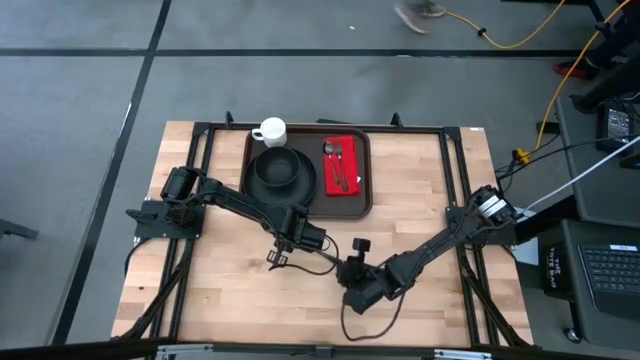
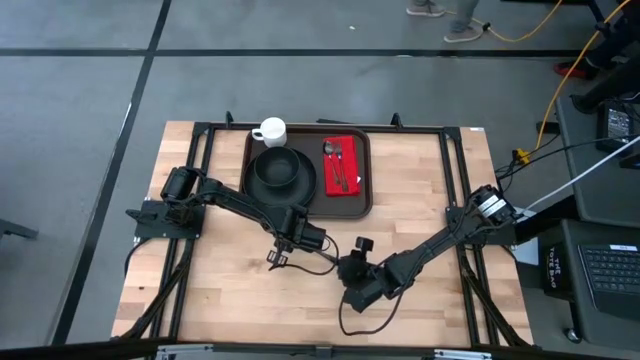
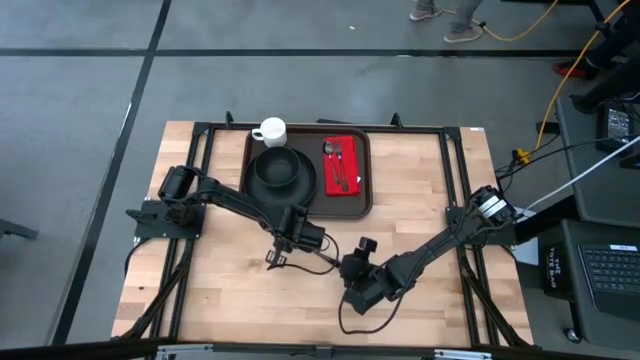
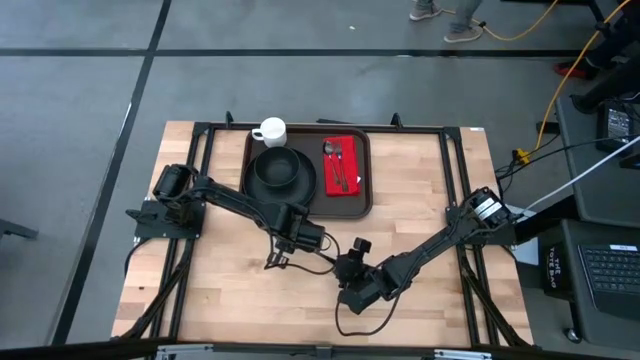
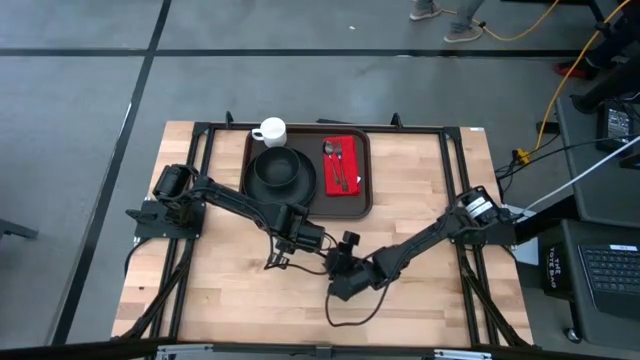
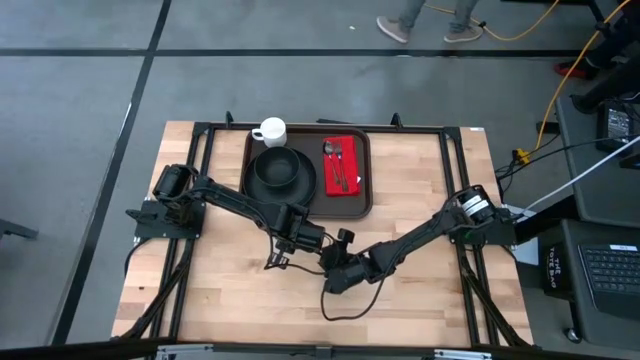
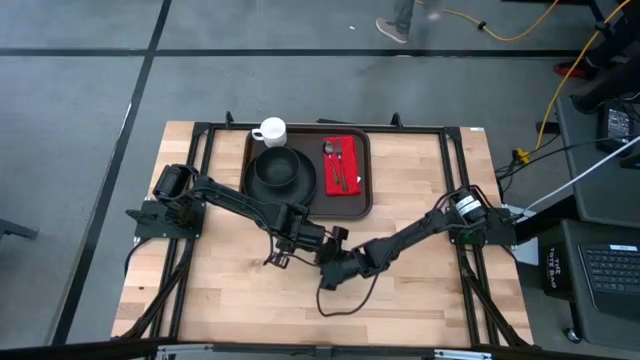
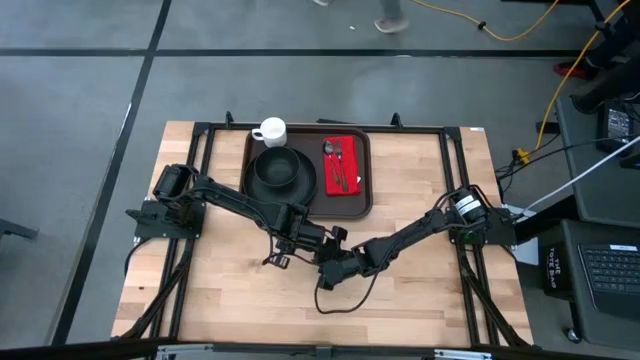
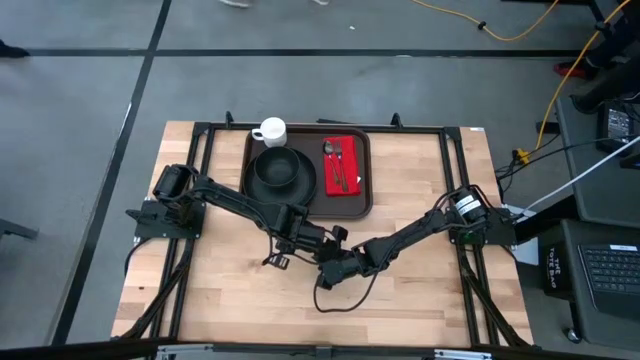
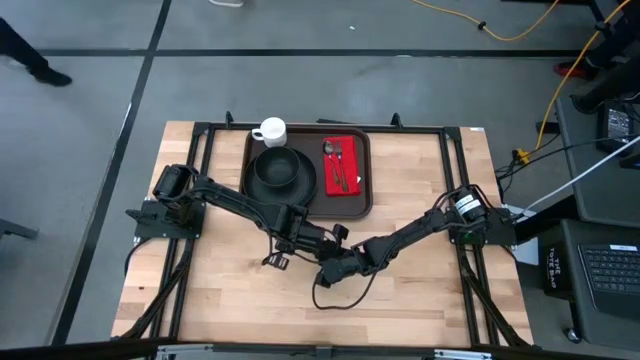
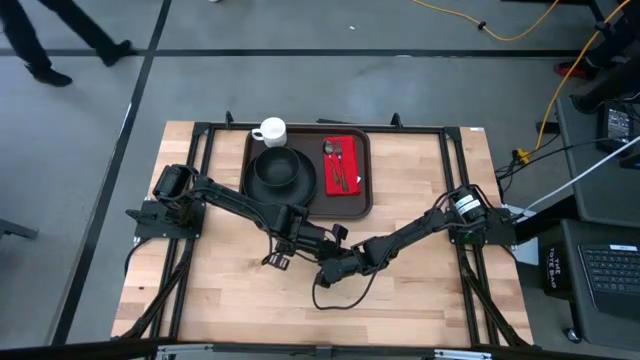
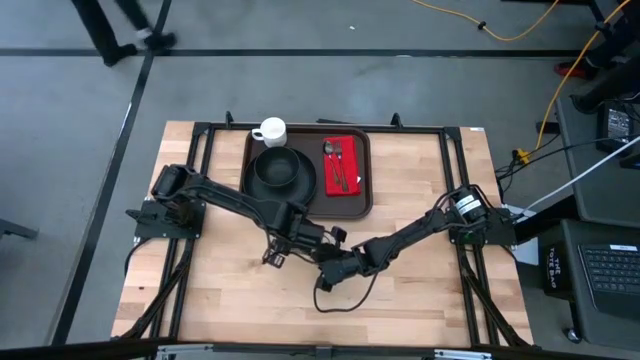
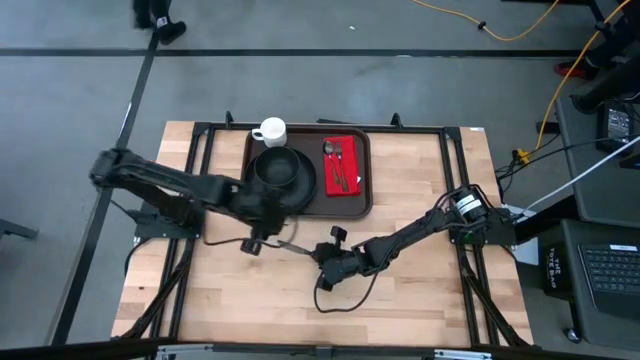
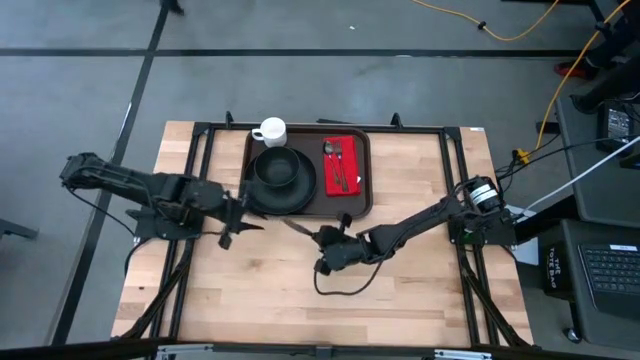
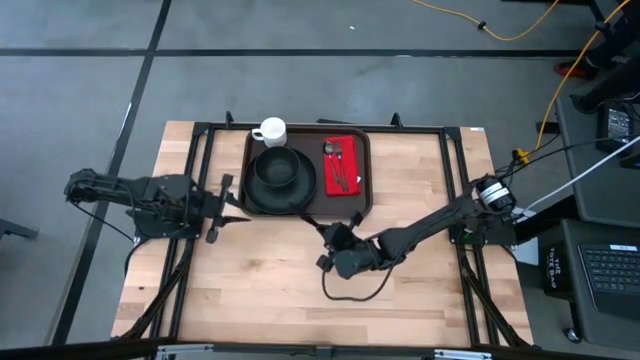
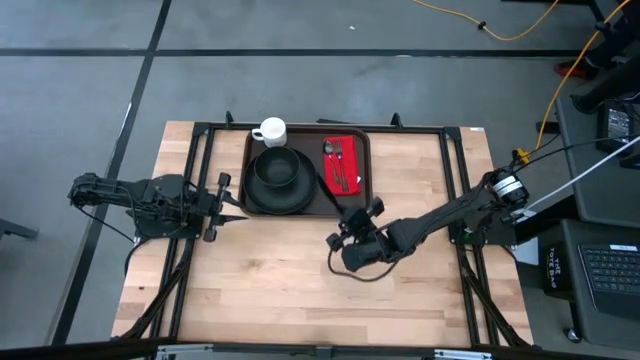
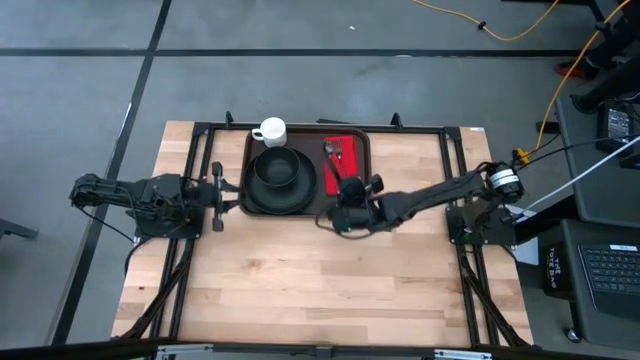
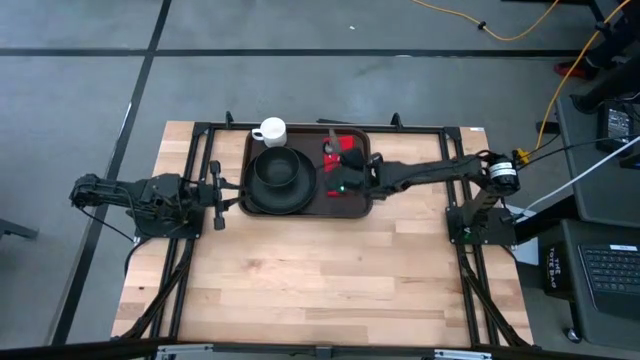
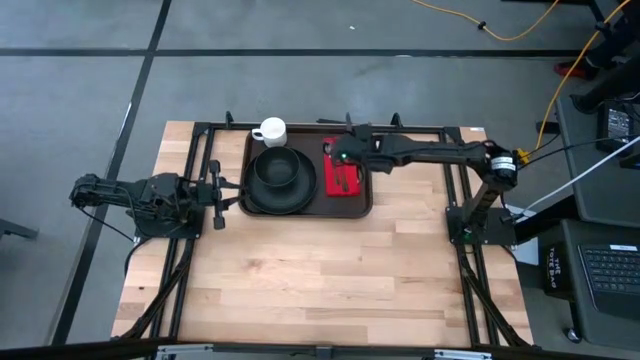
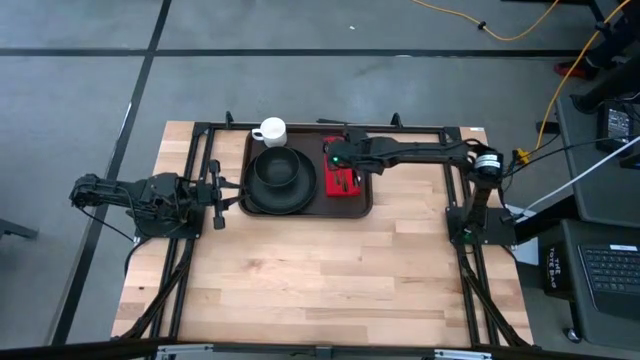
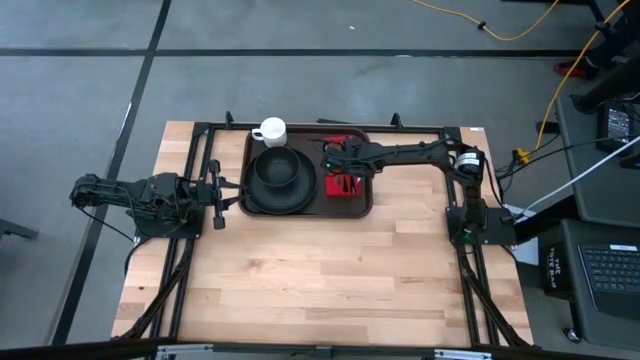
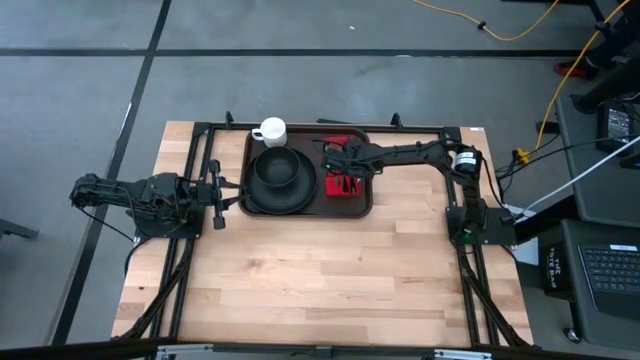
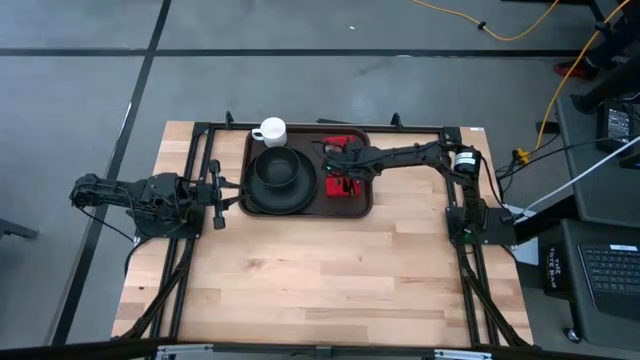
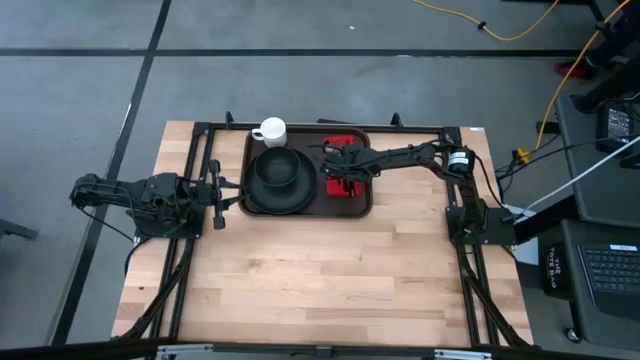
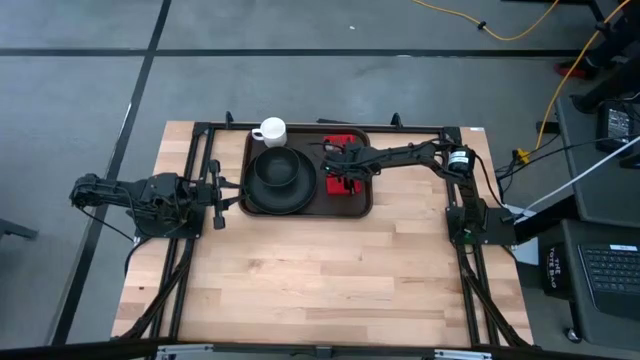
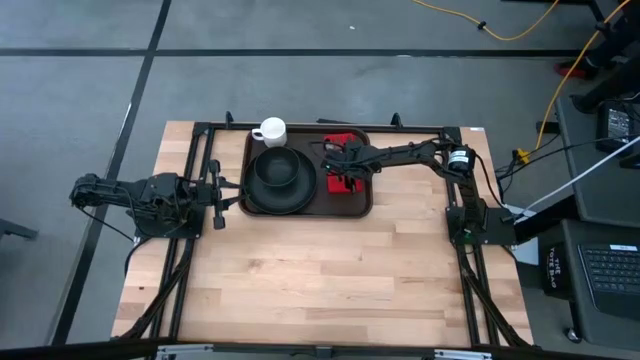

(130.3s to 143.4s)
Task: Set up tray
Put the silver knife on the red napkin to the right of the silver fork

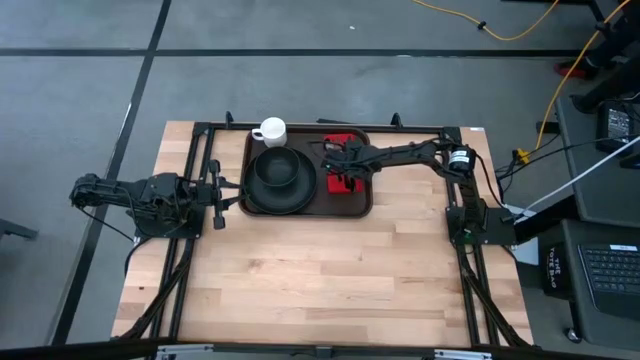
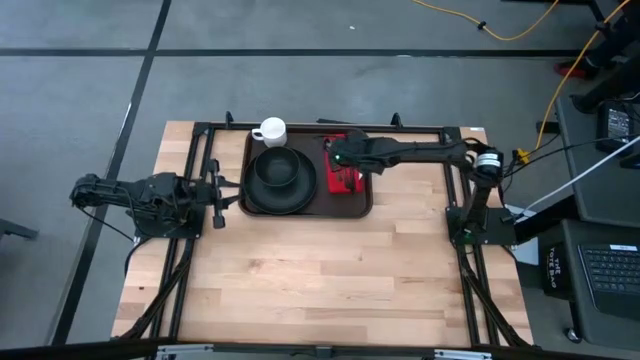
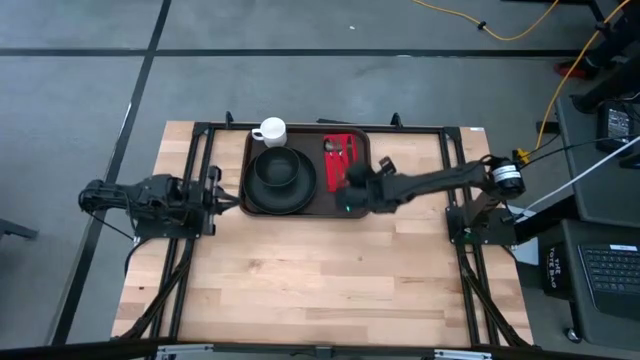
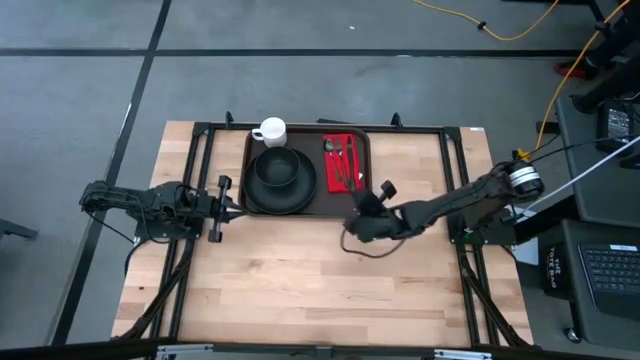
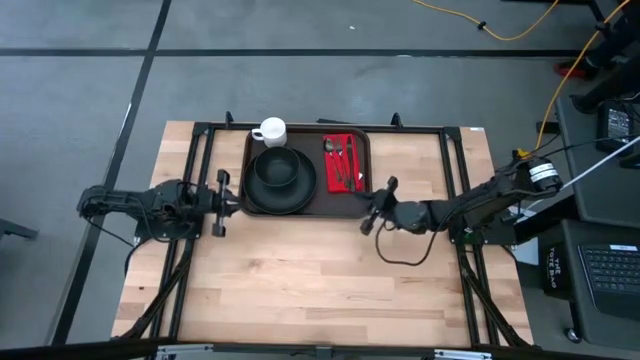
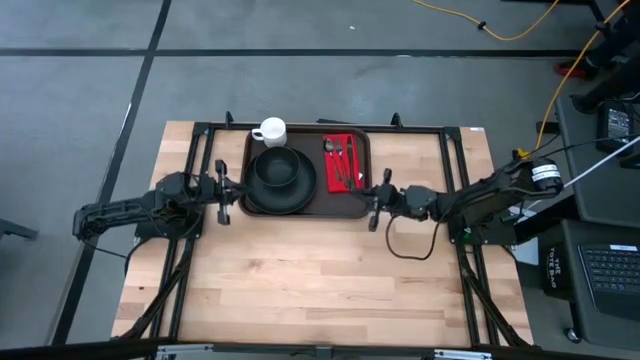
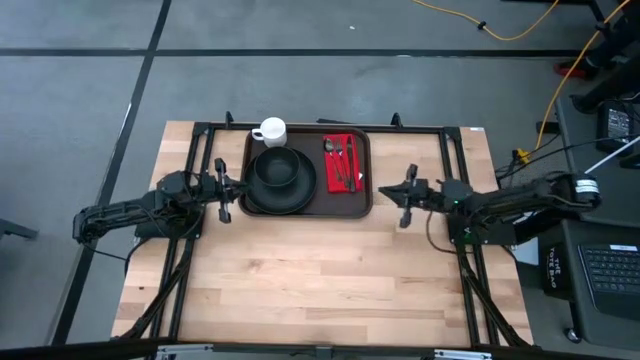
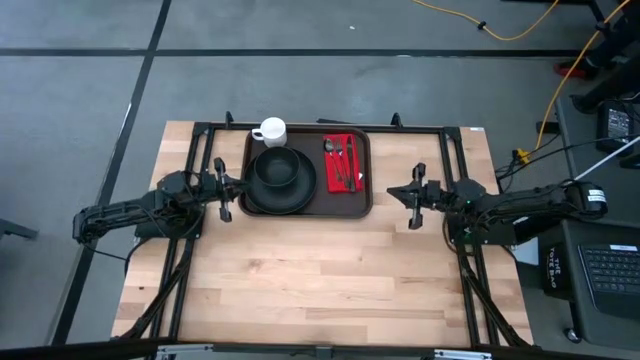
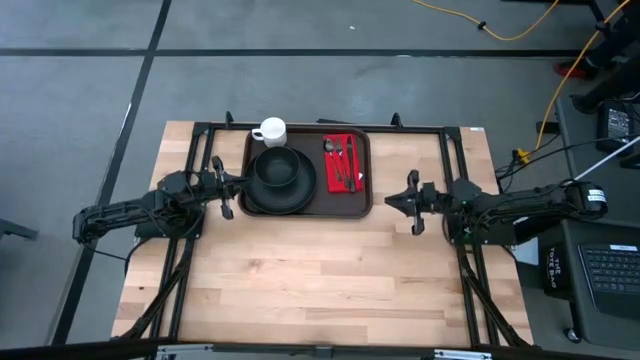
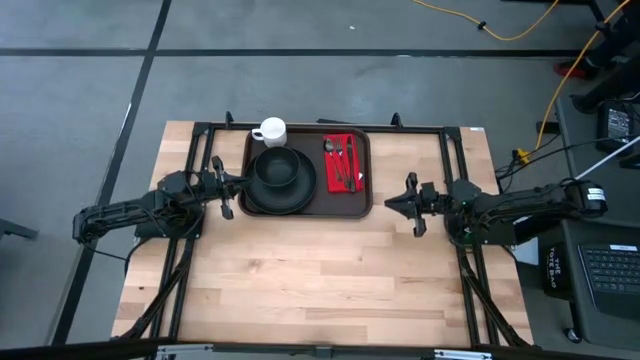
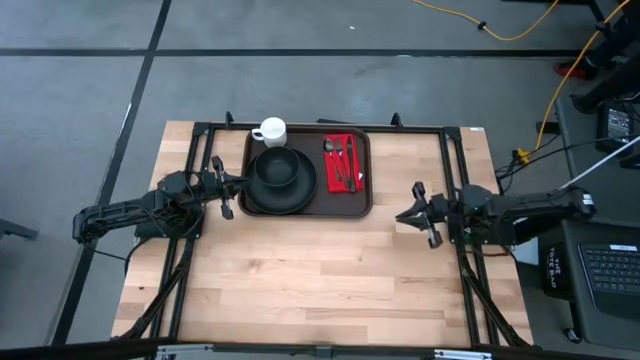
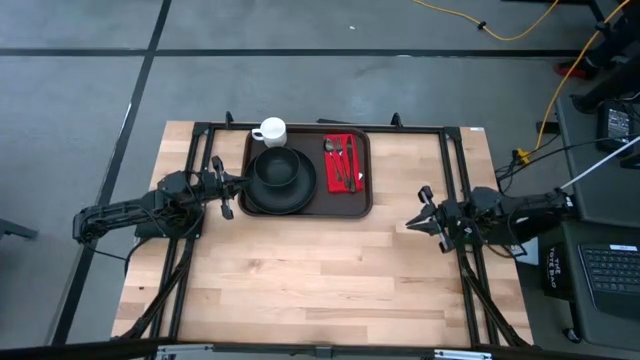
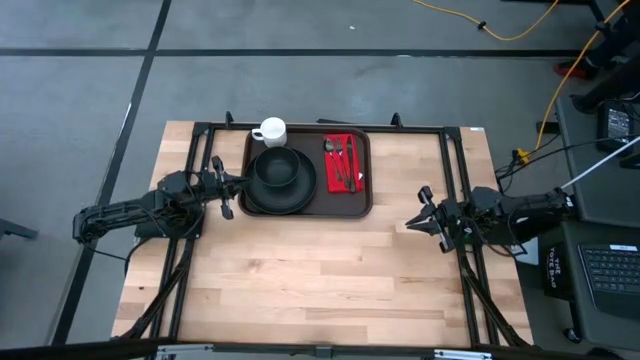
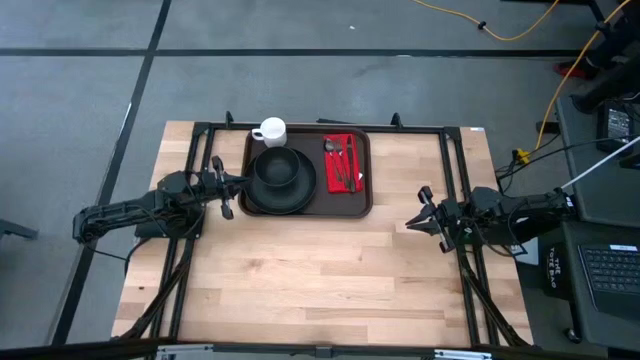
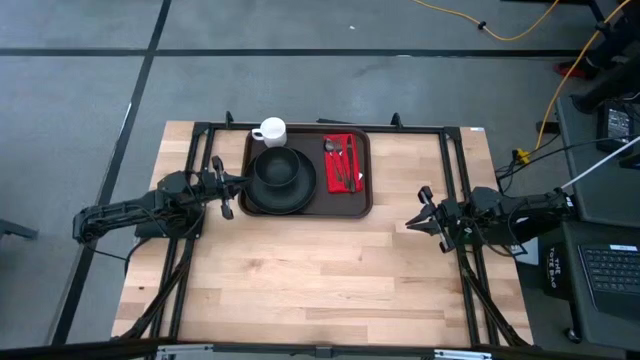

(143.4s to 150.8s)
Return to Home Position

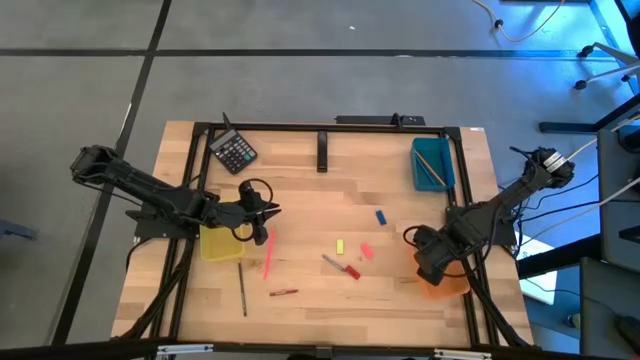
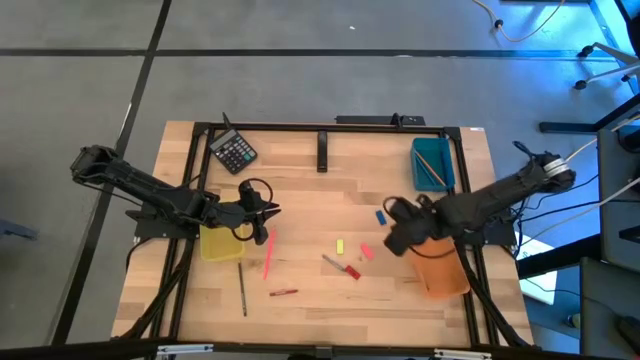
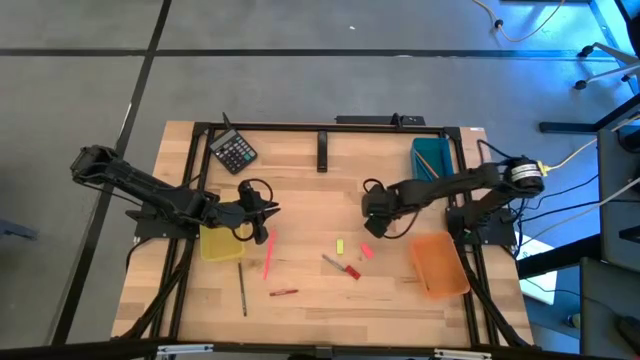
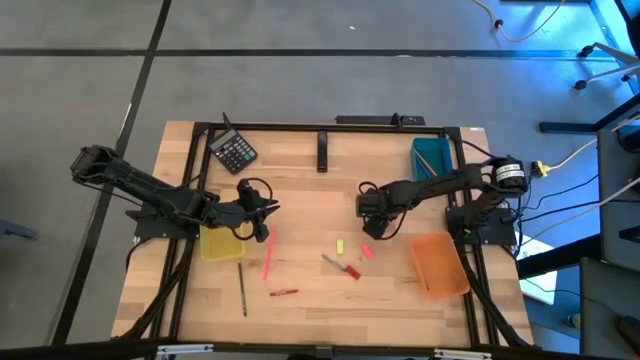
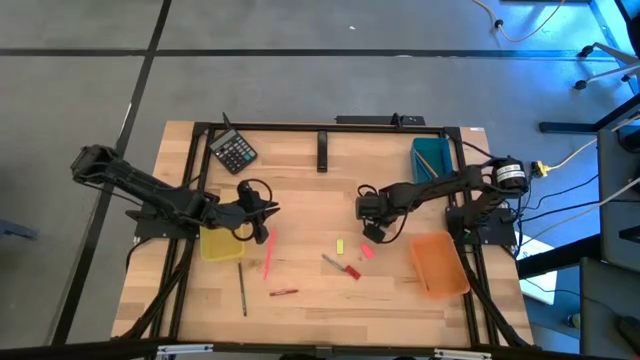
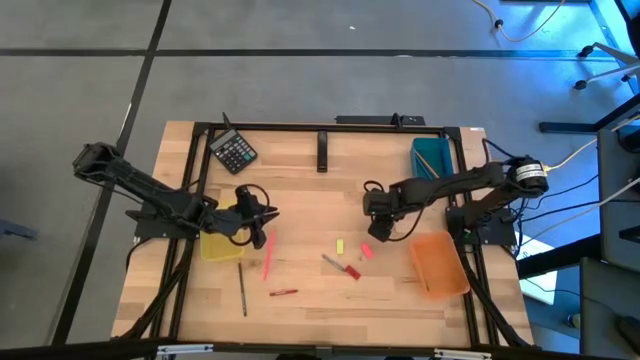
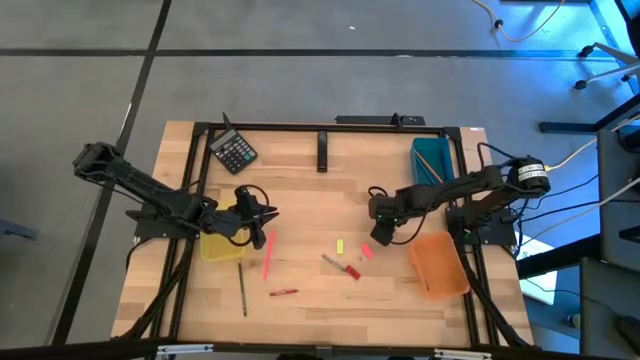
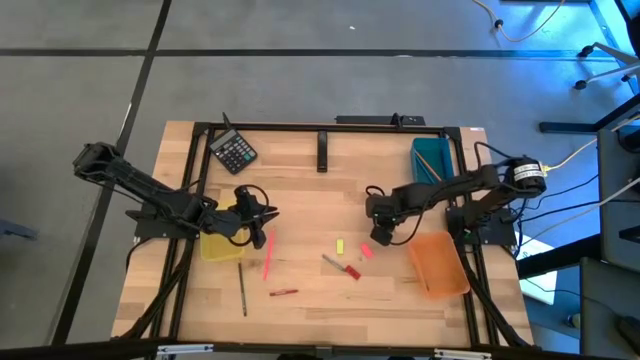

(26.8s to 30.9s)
Task: Sort crayons/erasers/pens/pencils in bins
Put the blue eraser into the yellow bin
